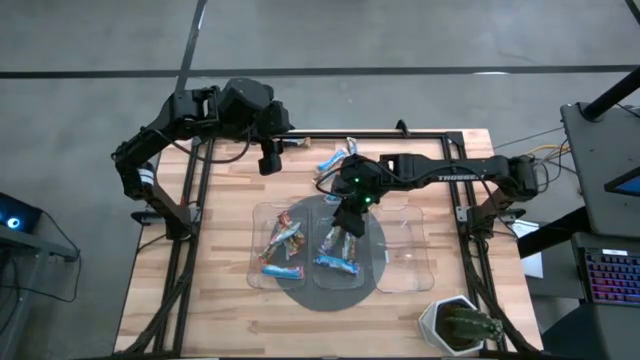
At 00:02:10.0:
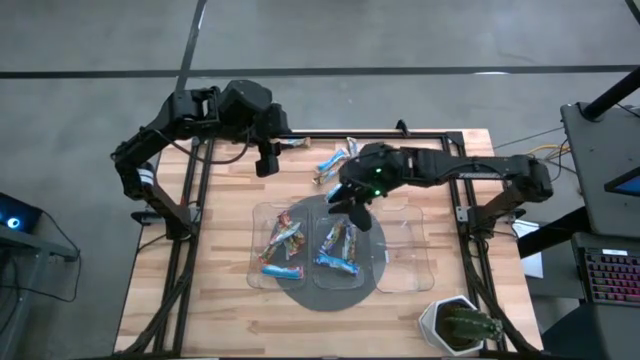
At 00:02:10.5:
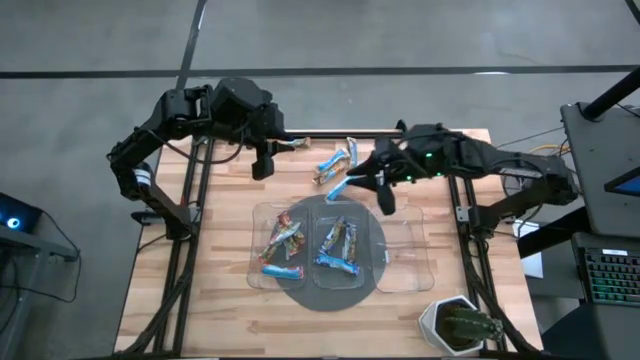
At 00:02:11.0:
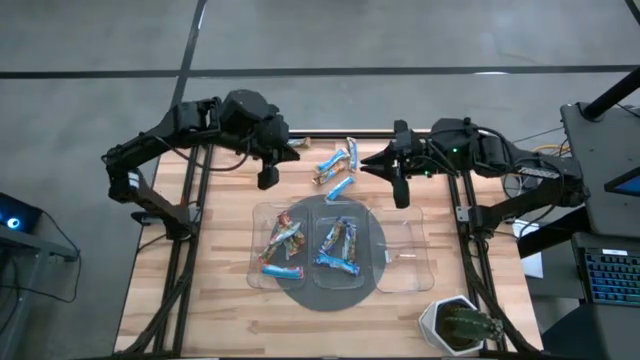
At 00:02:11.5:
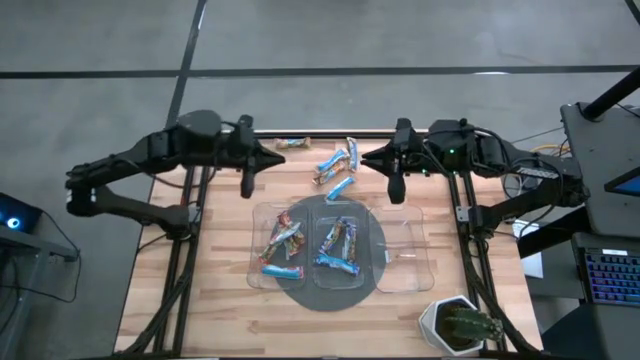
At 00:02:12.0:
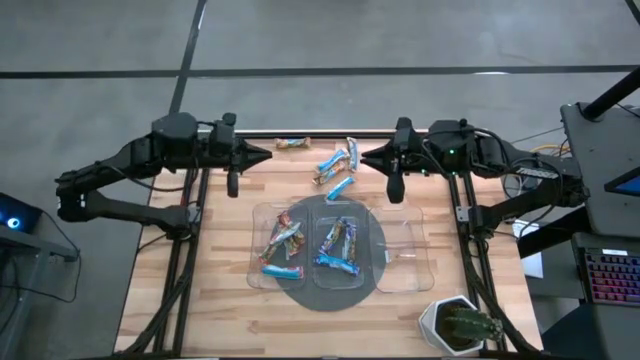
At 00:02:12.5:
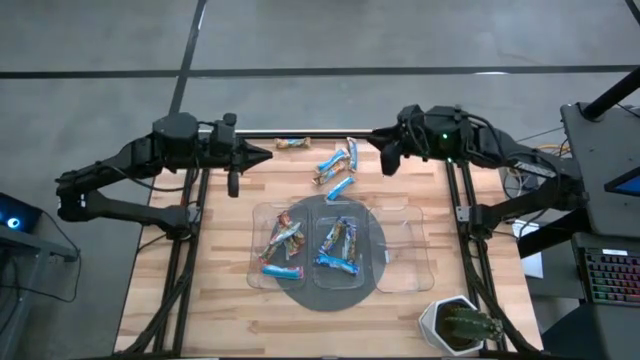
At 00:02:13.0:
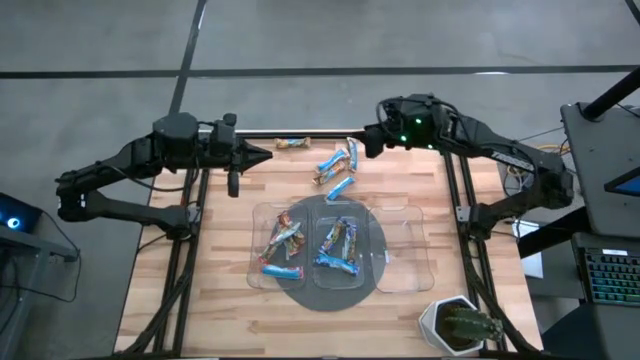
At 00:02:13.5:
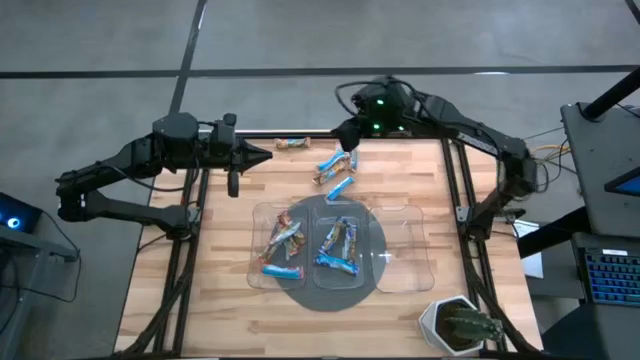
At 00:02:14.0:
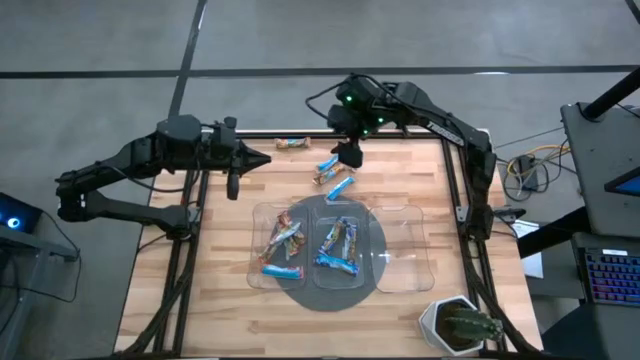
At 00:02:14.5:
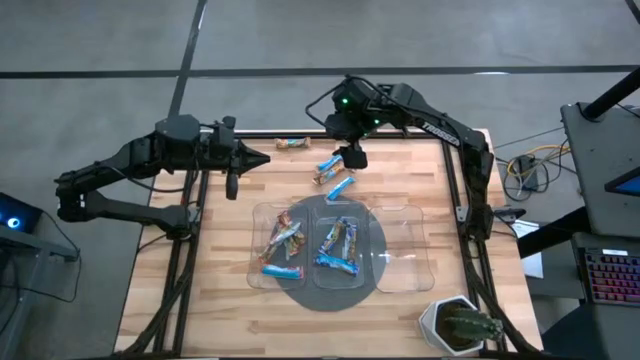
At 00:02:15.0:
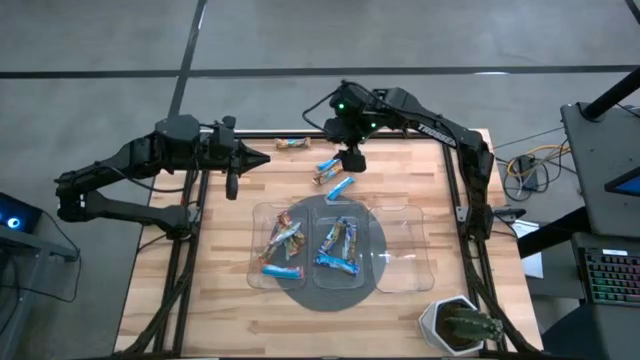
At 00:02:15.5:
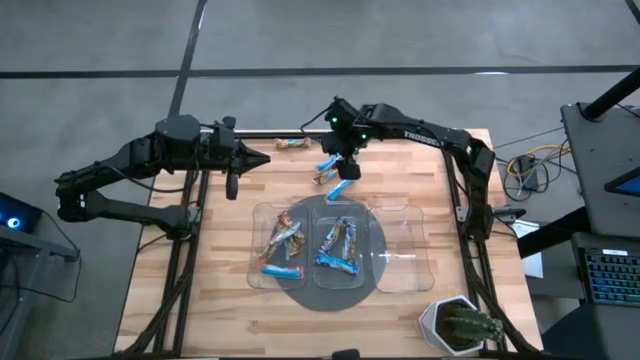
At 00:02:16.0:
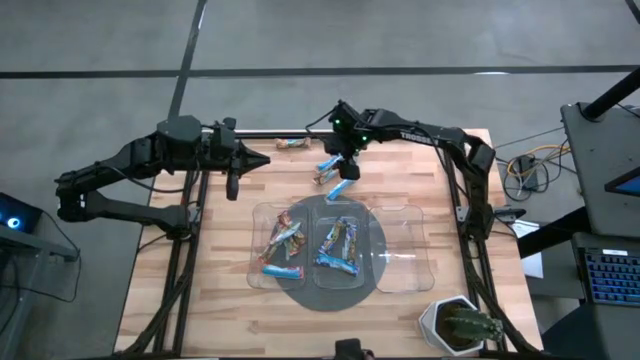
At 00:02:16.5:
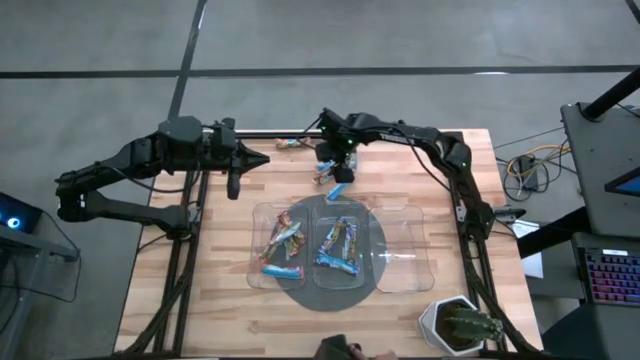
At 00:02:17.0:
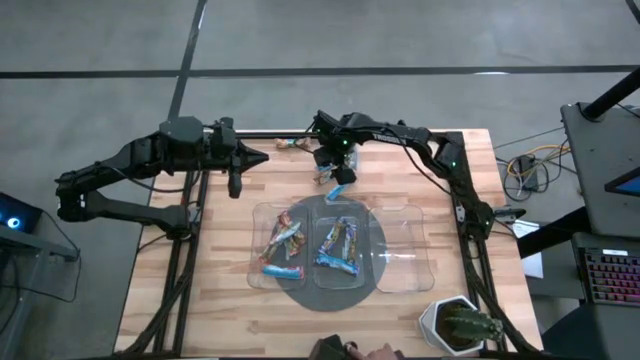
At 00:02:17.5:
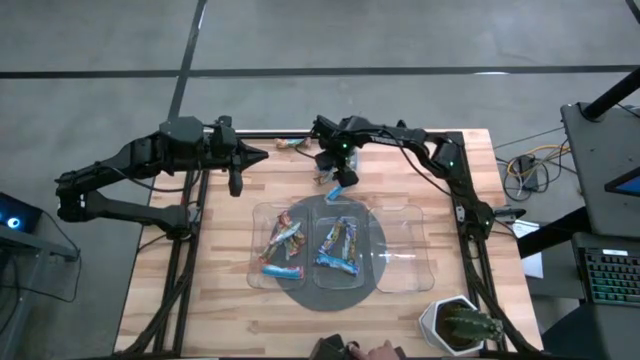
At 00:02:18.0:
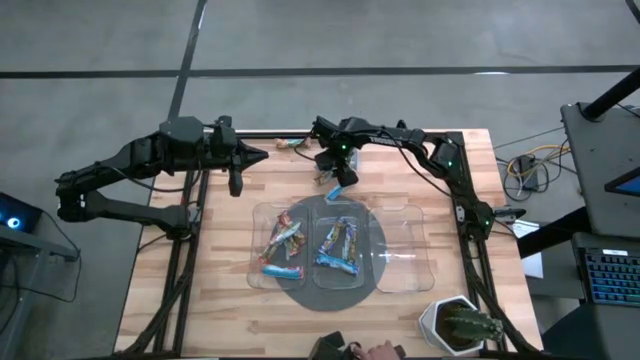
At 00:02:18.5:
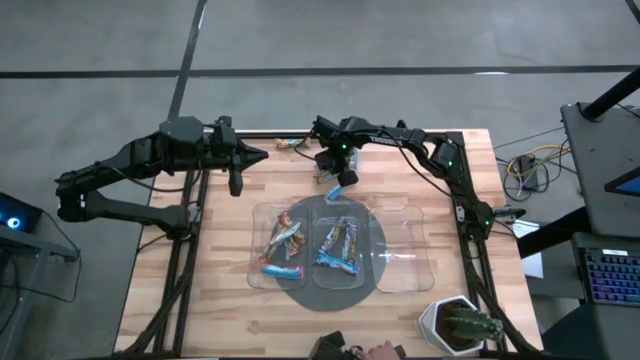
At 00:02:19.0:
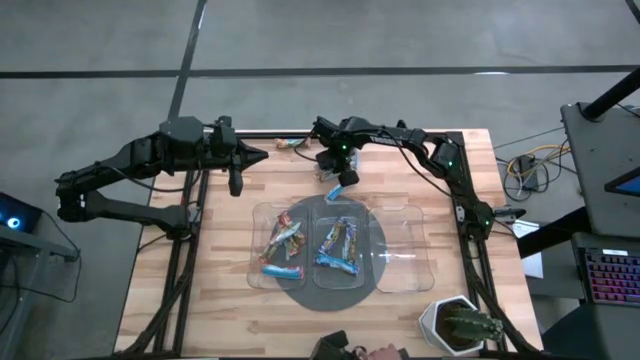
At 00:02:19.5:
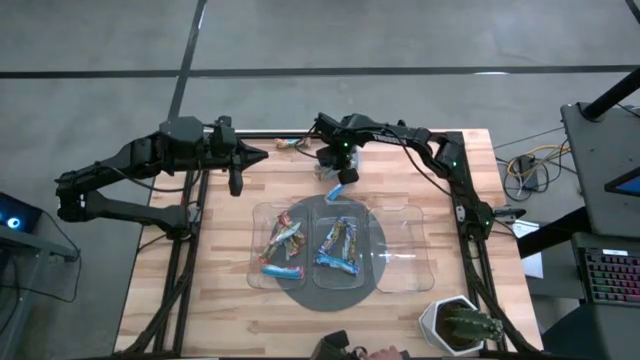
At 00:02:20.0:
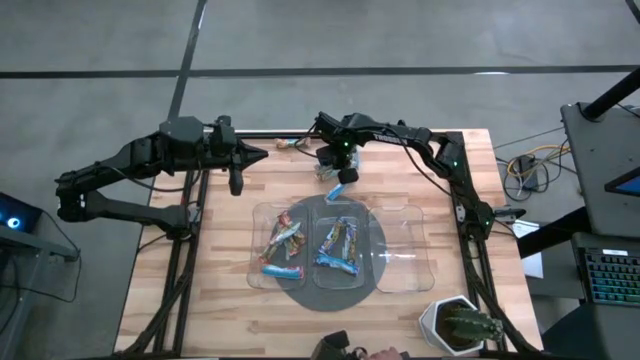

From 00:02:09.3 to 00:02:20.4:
Task: Pick and place Granola Bars by type
Put the yellow granola bar into the right transparent bin

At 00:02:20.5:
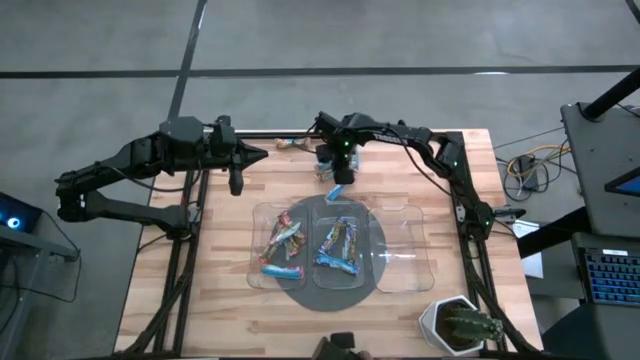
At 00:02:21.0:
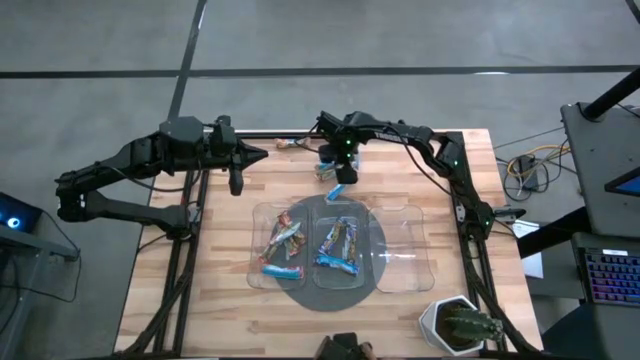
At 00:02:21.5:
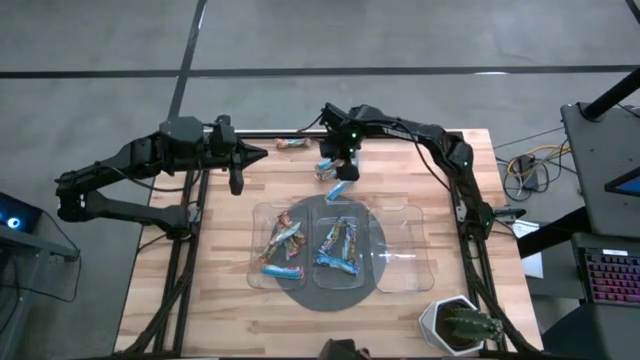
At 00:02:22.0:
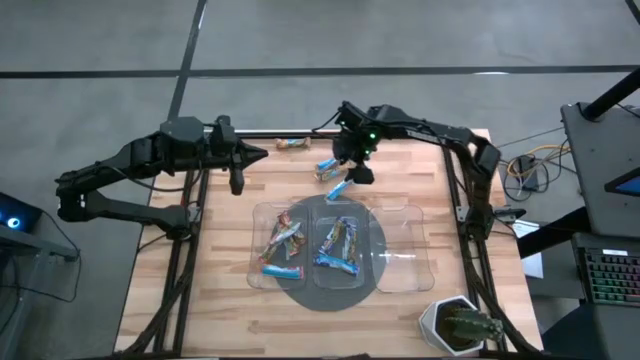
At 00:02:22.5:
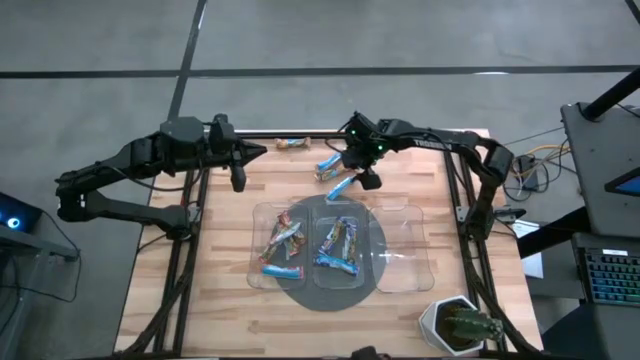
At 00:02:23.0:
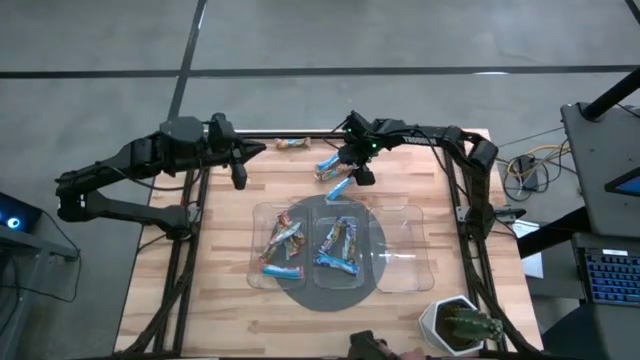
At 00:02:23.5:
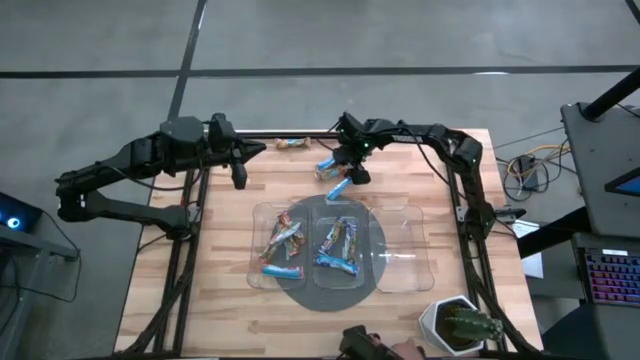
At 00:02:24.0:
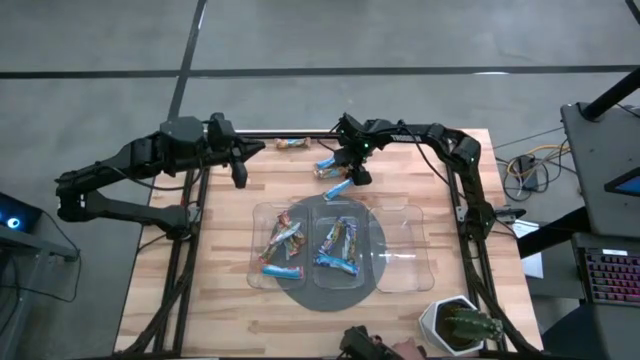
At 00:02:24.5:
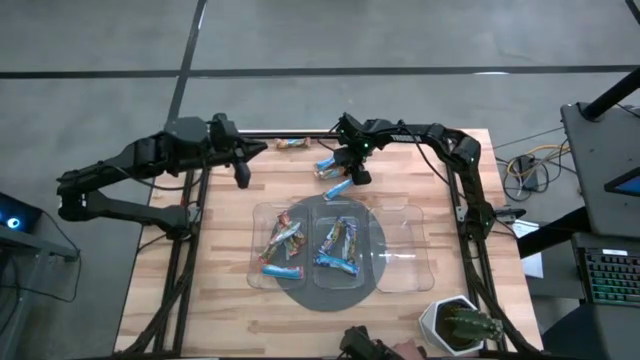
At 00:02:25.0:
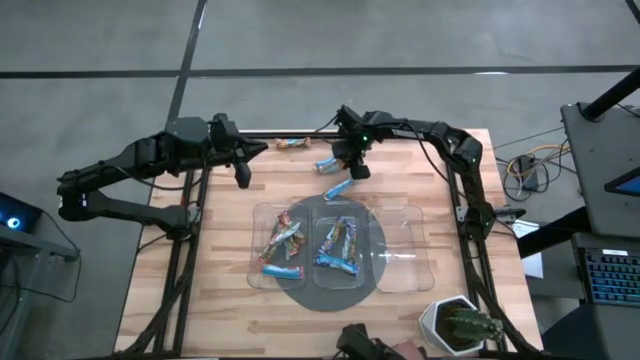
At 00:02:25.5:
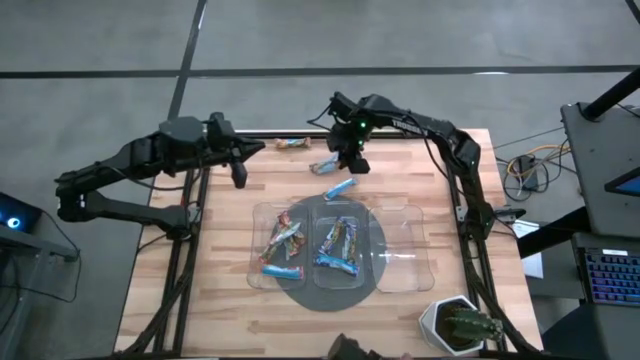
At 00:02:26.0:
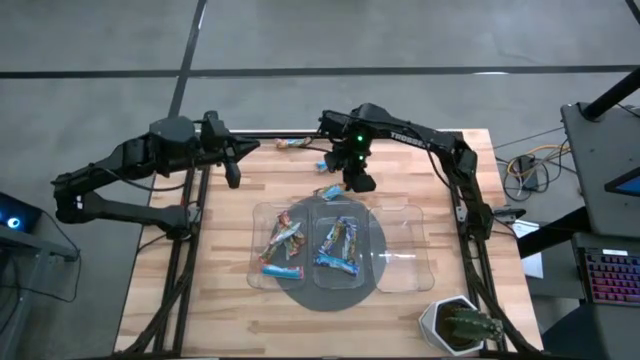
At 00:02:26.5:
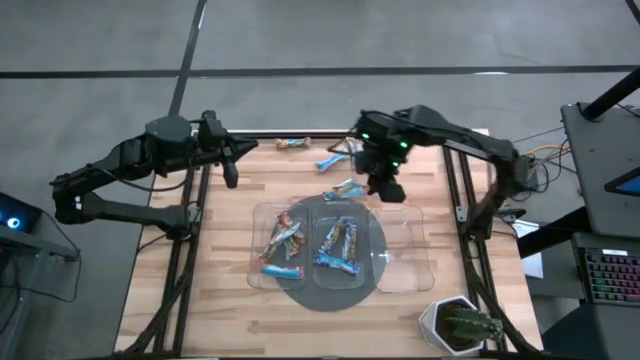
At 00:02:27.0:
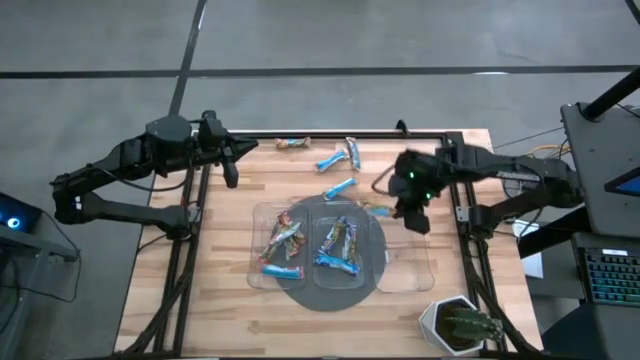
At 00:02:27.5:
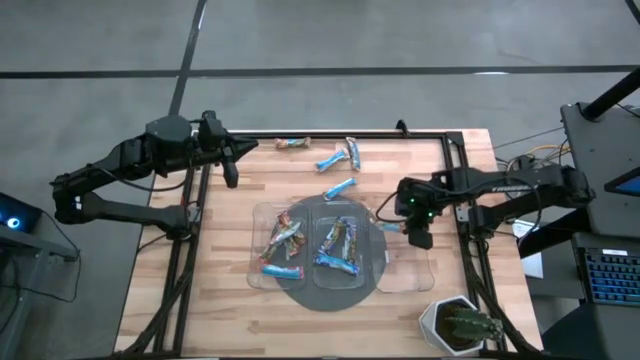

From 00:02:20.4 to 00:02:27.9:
Put the yellow granola bar into the right transparent bin

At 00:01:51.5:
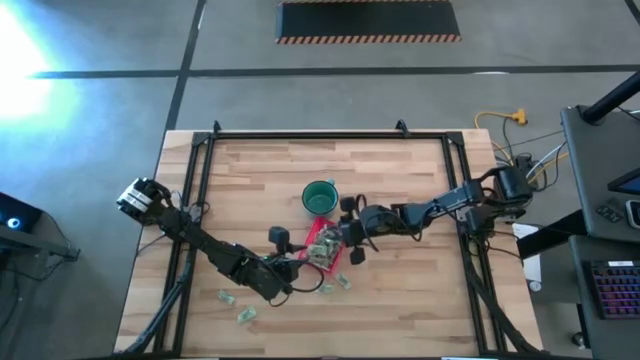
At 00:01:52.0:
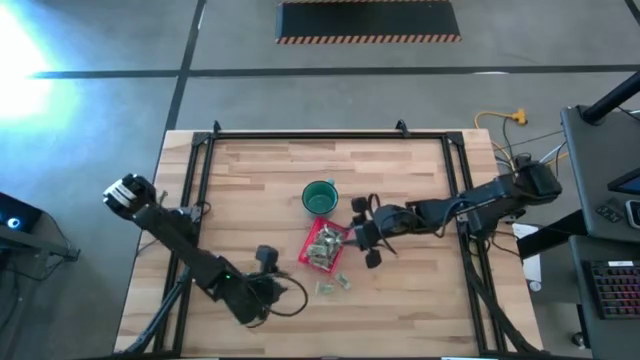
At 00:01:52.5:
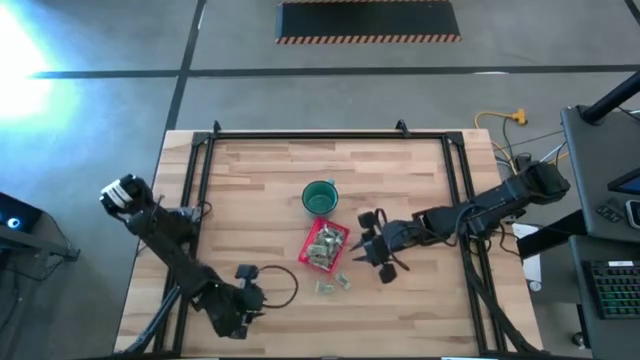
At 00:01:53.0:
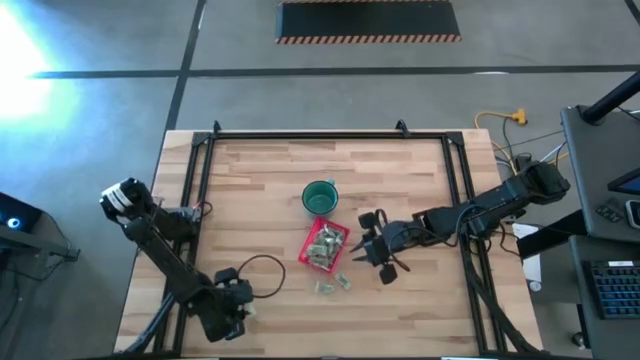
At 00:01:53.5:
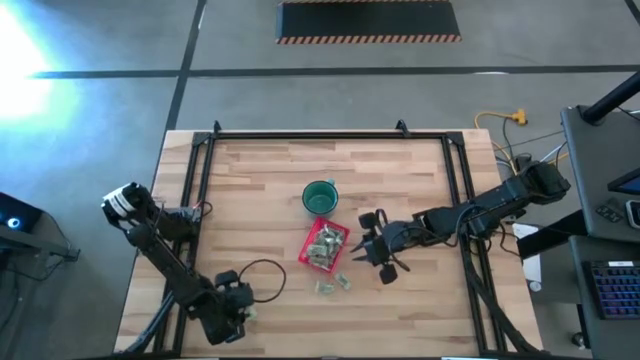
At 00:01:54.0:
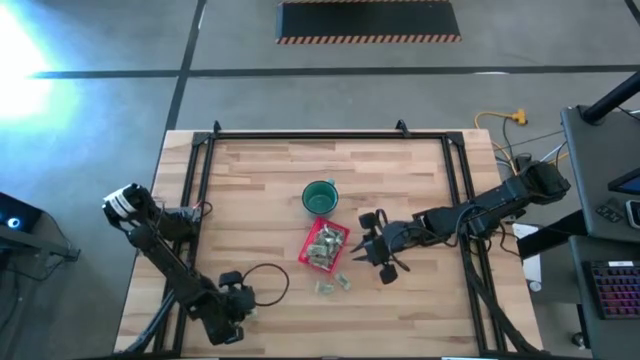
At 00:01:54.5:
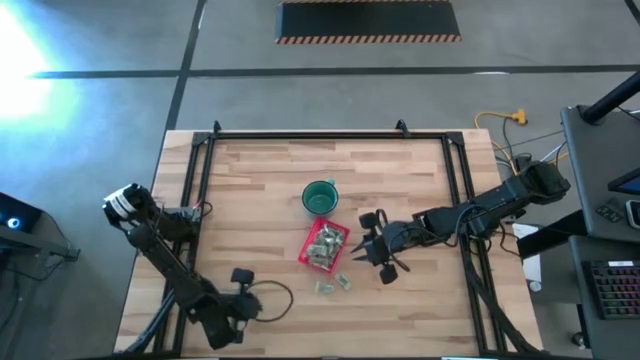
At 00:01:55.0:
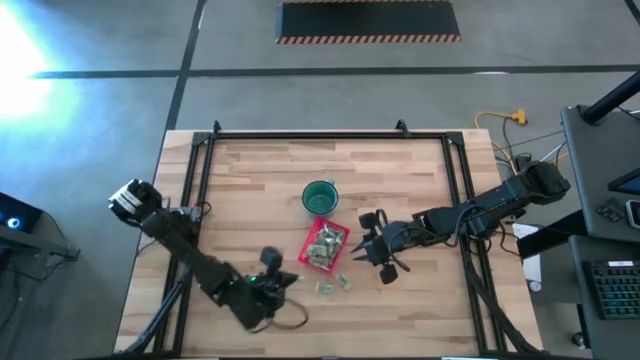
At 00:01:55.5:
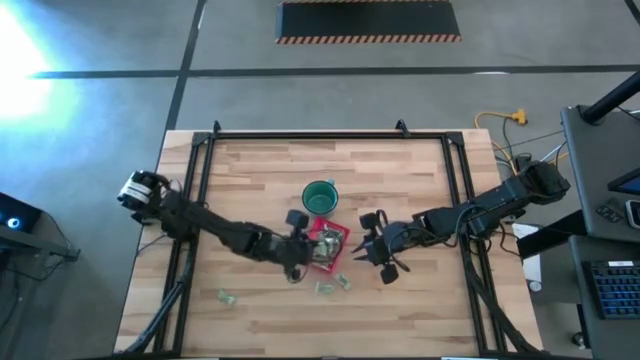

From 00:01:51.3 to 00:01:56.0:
Task: Pick and place items into bin
Put the light green stevia packet into the red bin
